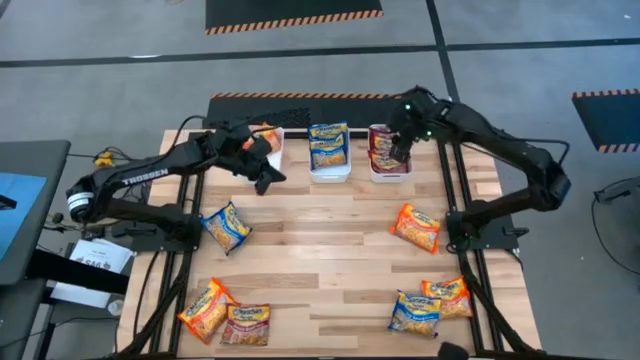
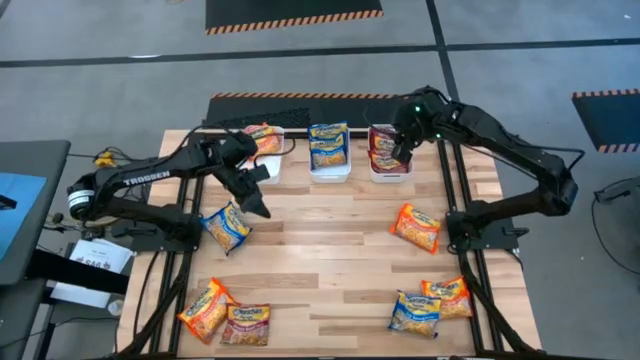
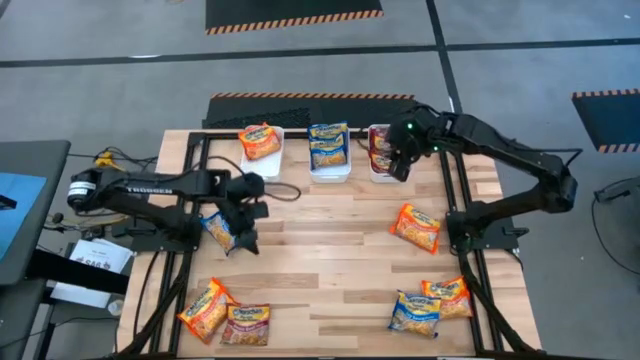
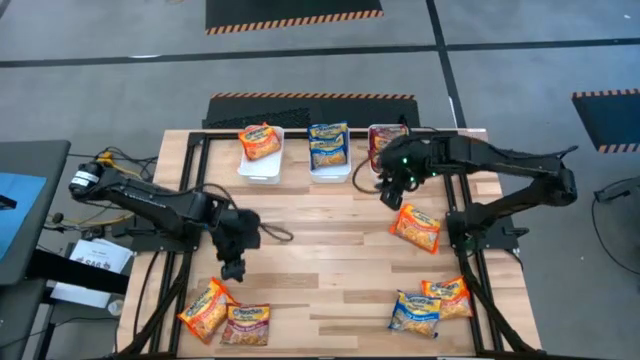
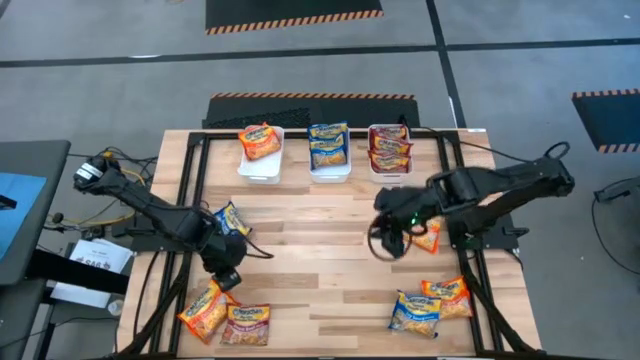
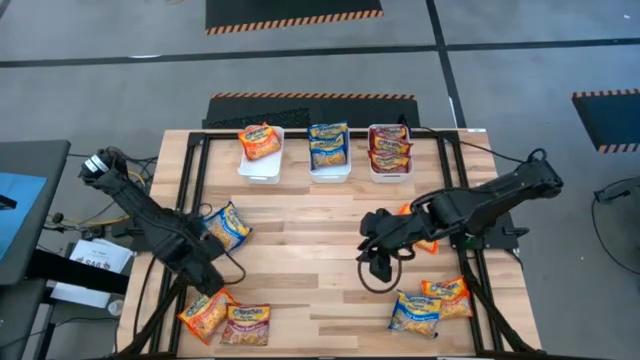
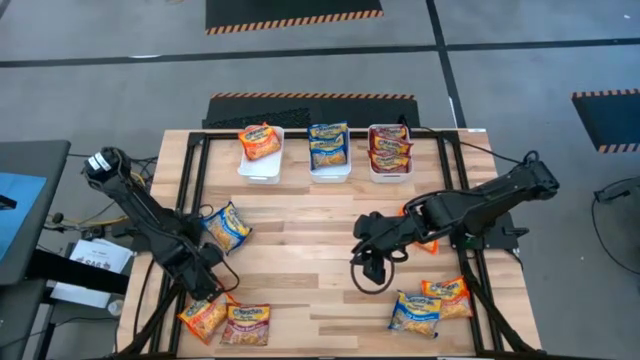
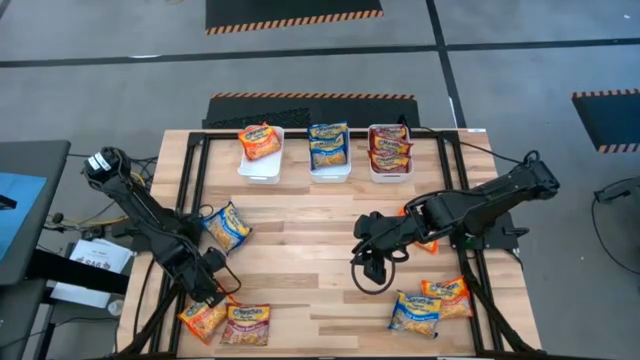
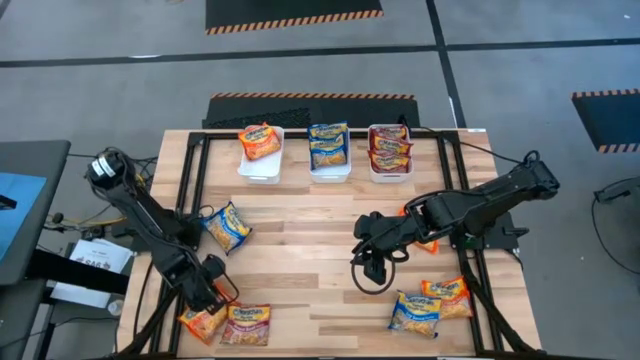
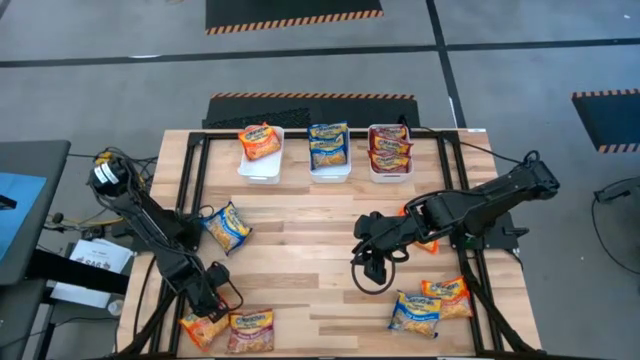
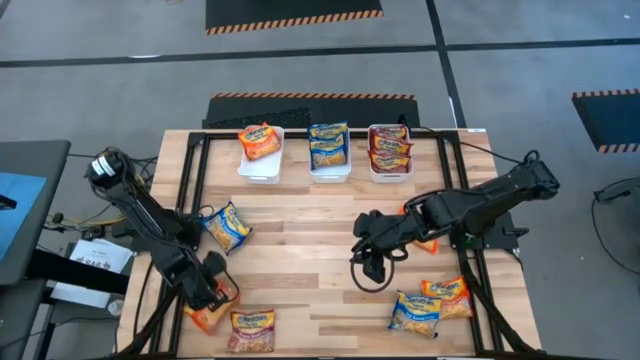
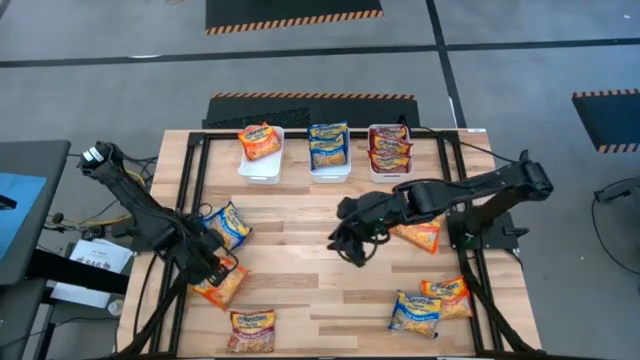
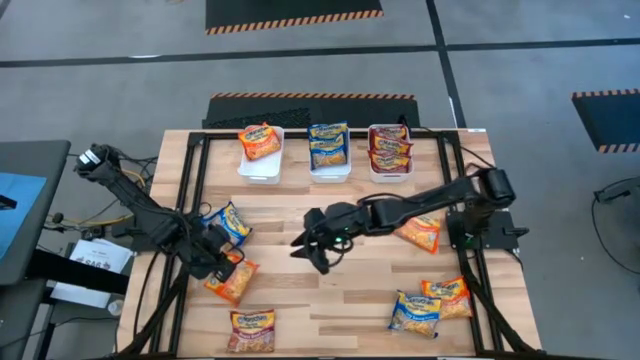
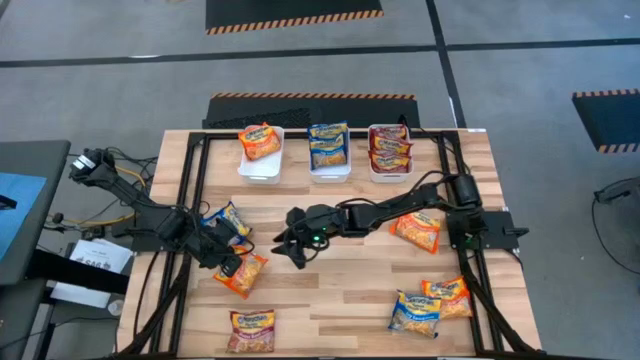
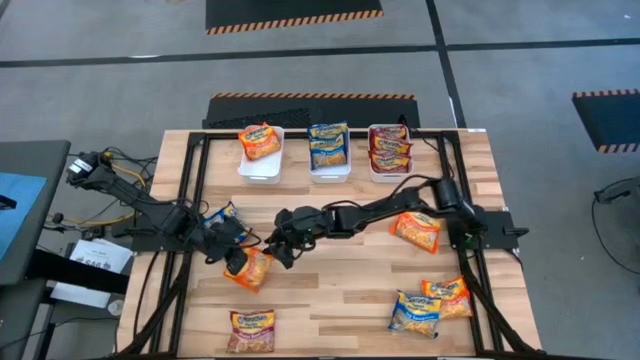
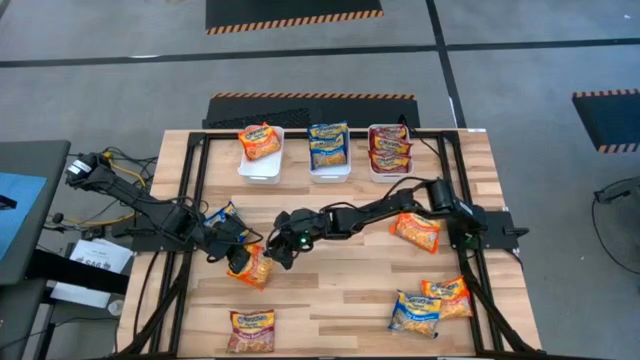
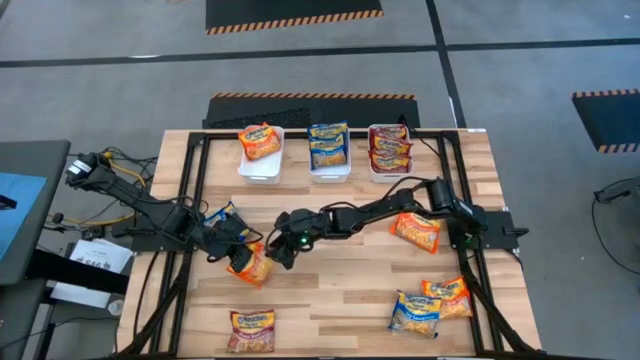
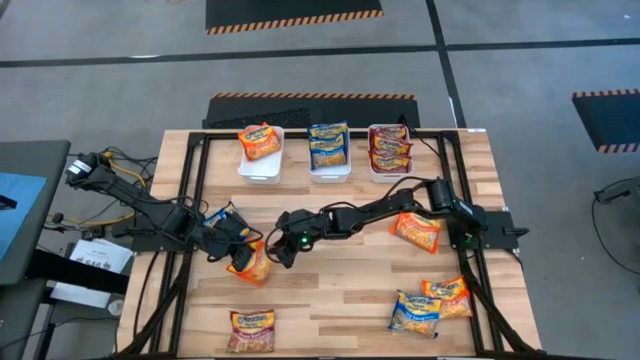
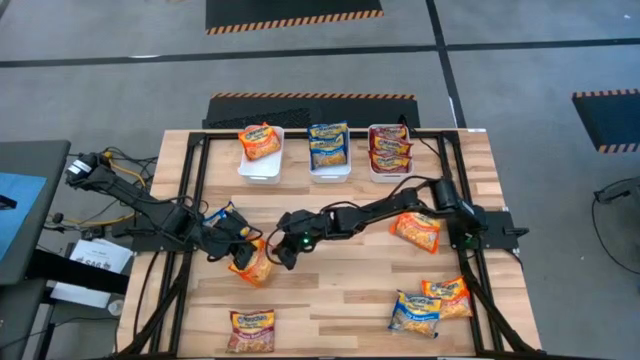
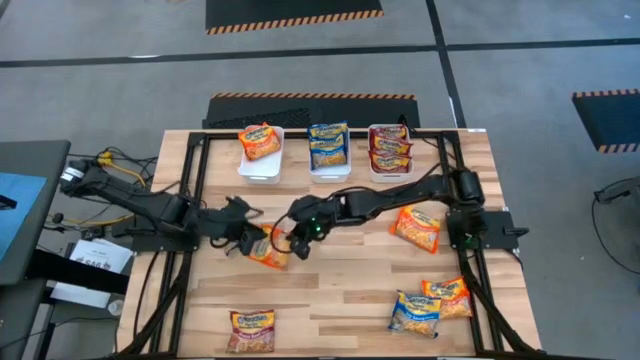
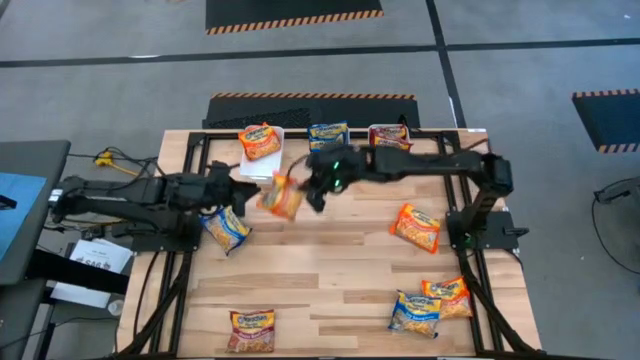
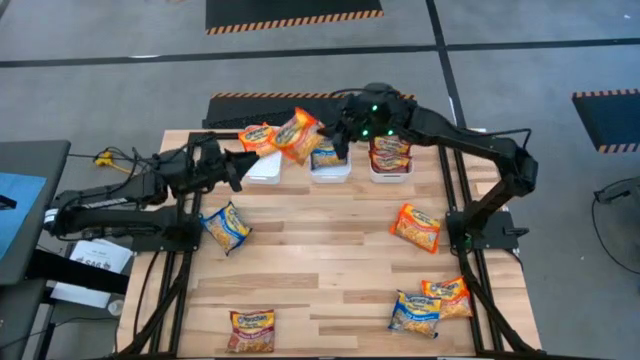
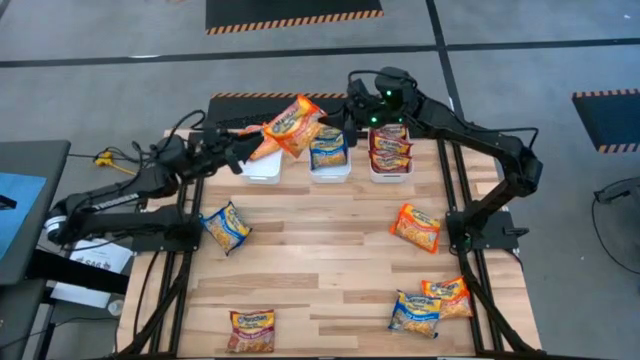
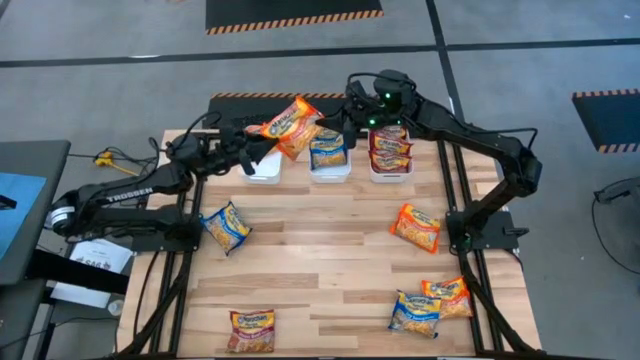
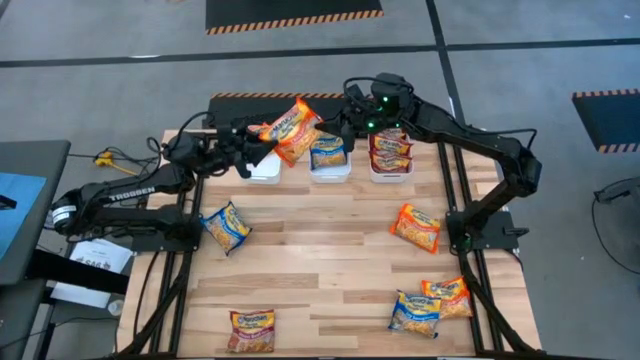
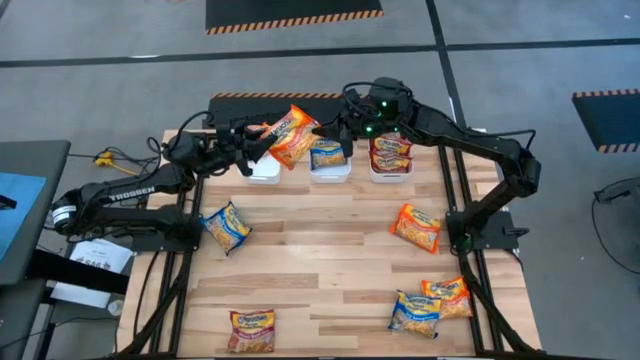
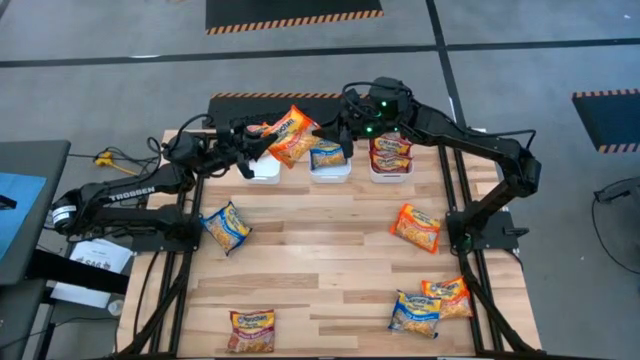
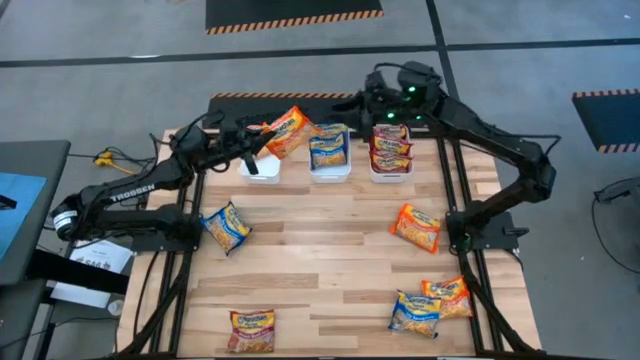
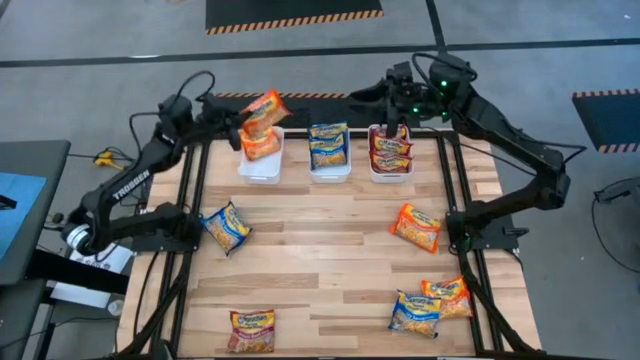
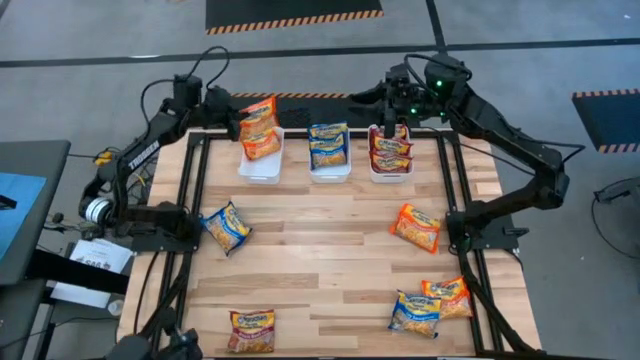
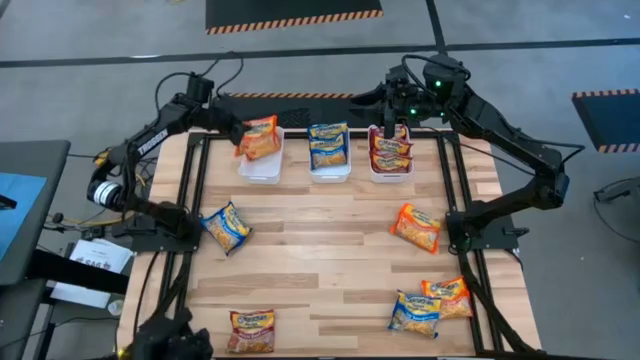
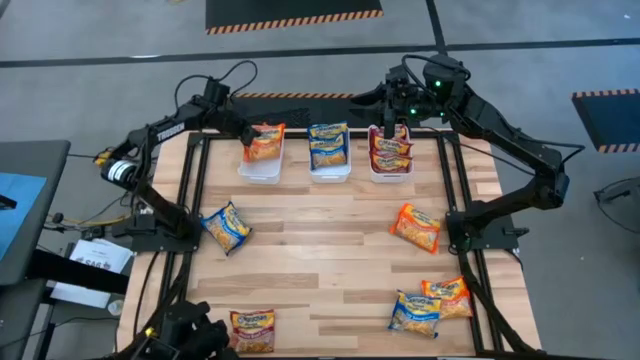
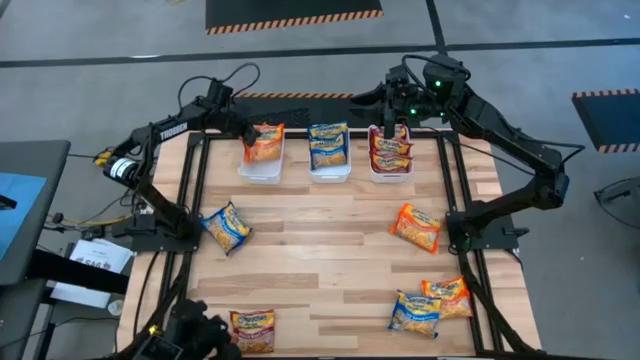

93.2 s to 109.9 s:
Task: Sort Maruchan noodles
Put the orange noodle pack into the left white bin

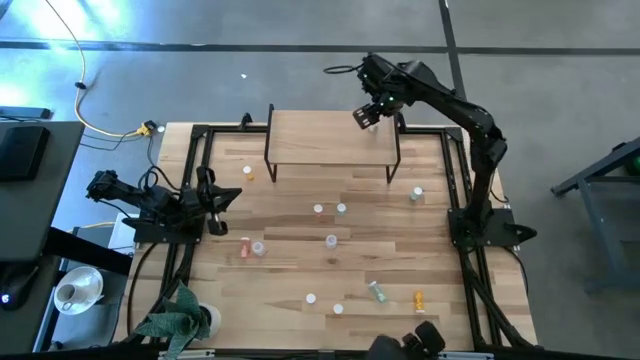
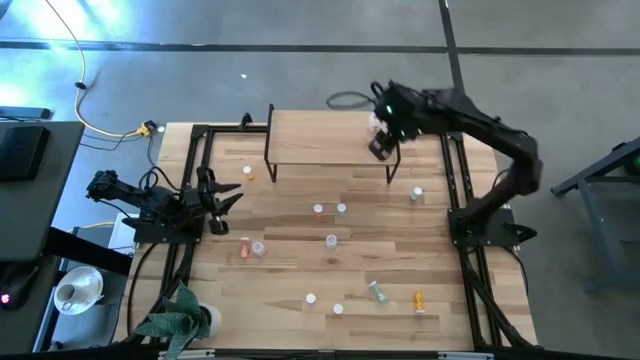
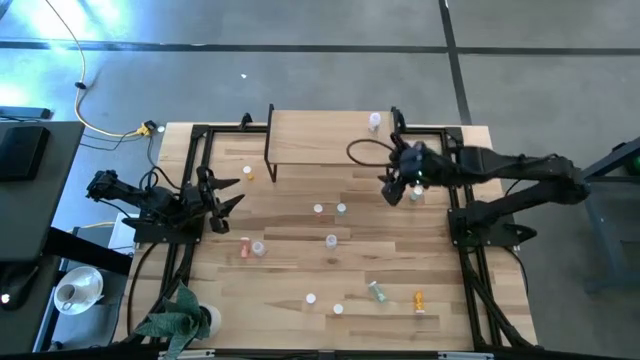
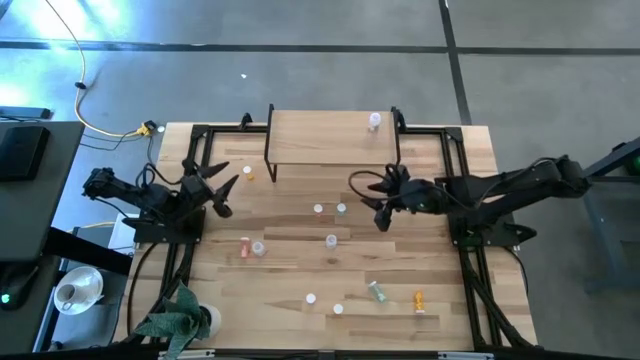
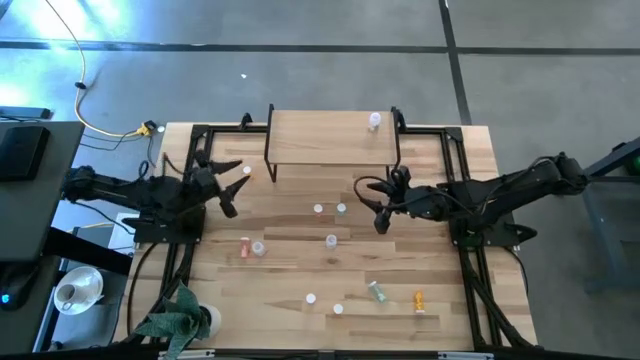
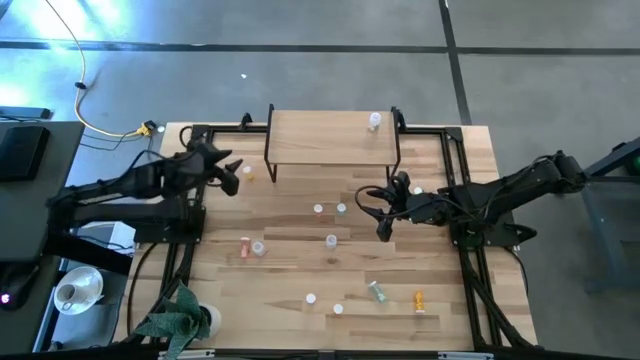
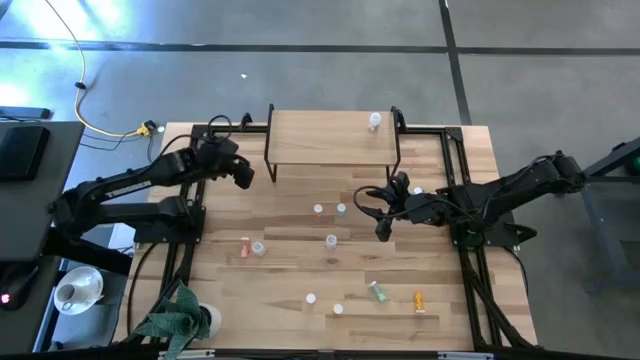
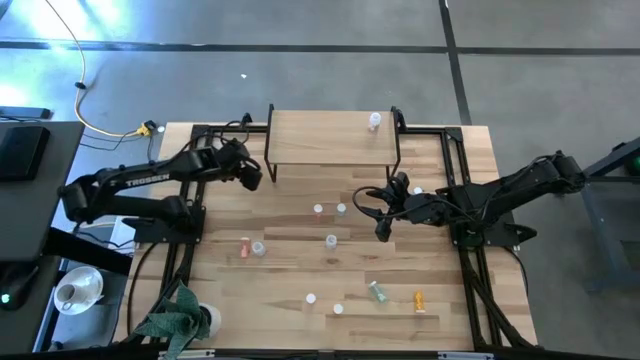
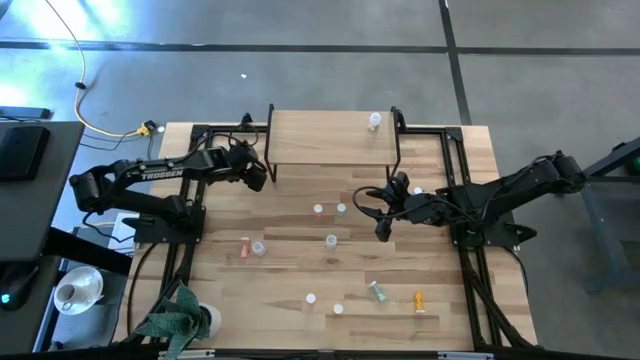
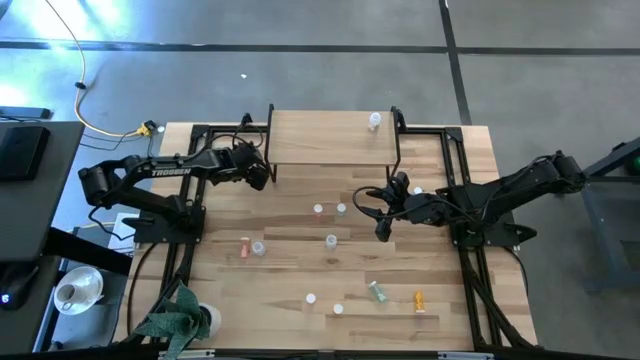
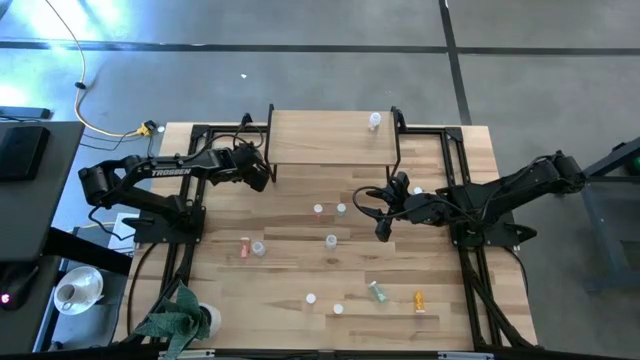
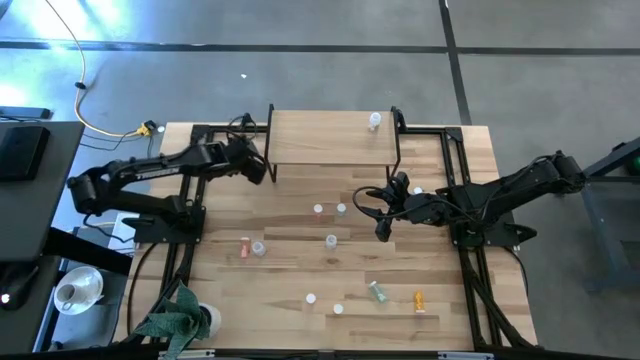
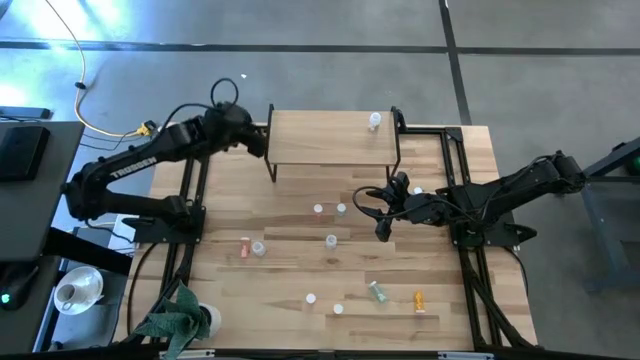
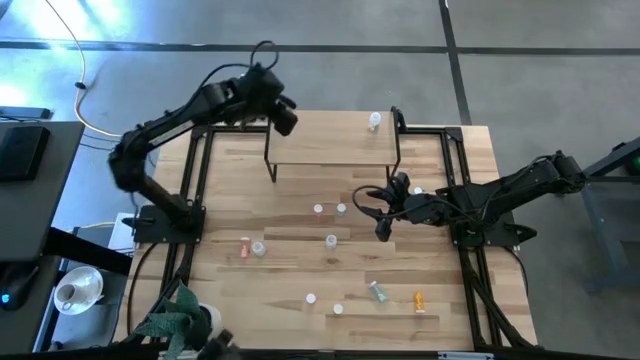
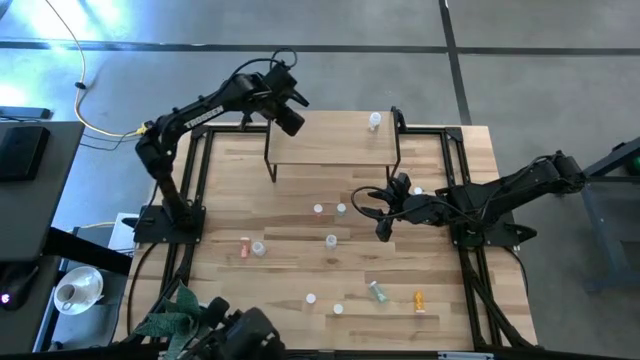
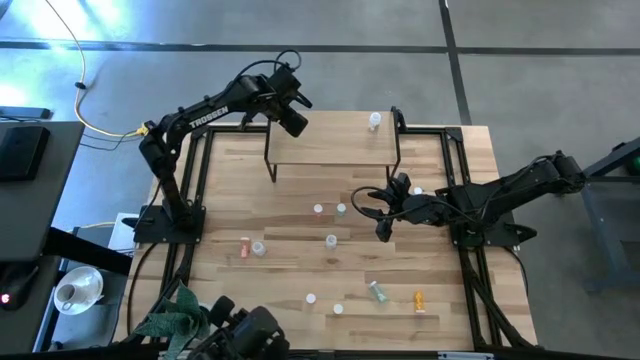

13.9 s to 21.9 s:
Task: Pick and place medicine bottles onto shelf by color
Put the top left orange pill bottle on the shelf
